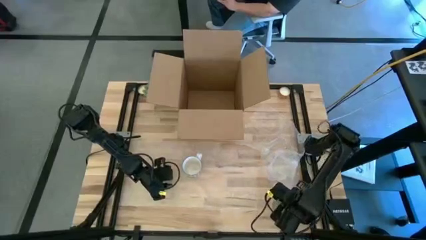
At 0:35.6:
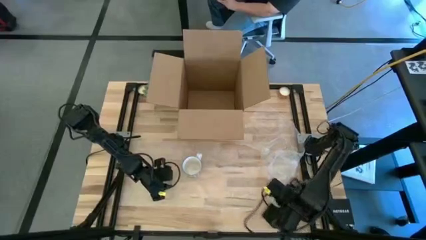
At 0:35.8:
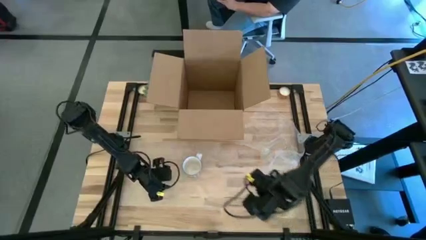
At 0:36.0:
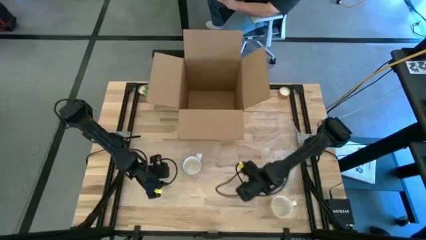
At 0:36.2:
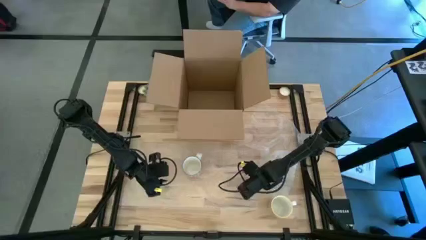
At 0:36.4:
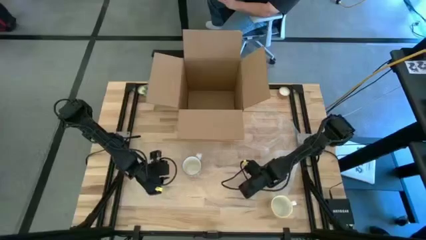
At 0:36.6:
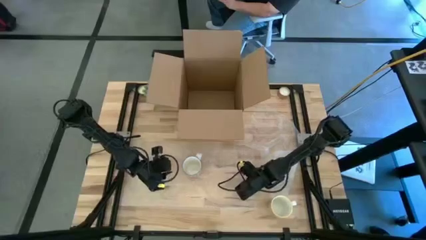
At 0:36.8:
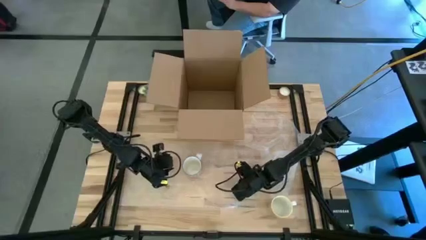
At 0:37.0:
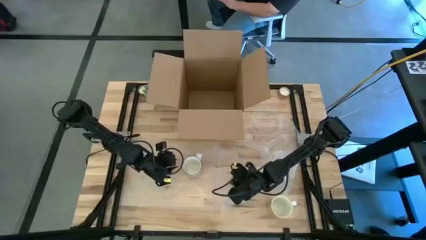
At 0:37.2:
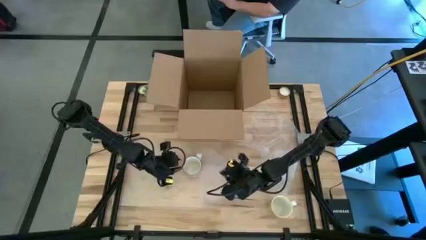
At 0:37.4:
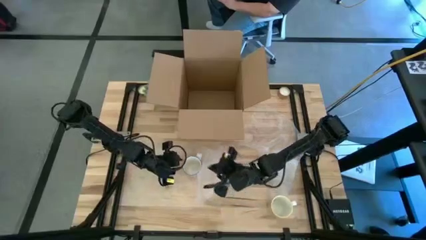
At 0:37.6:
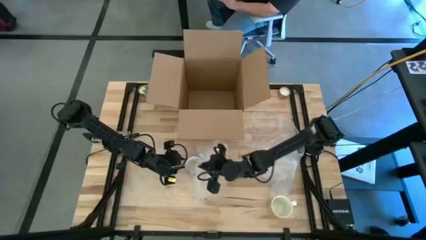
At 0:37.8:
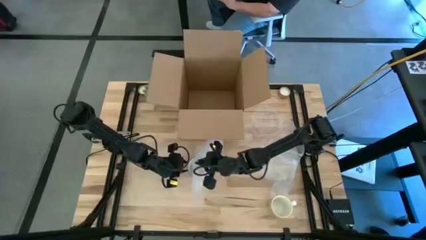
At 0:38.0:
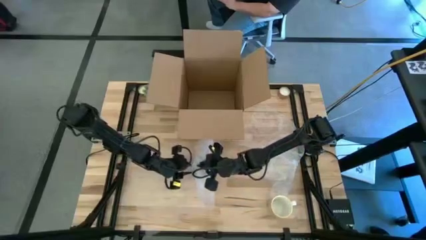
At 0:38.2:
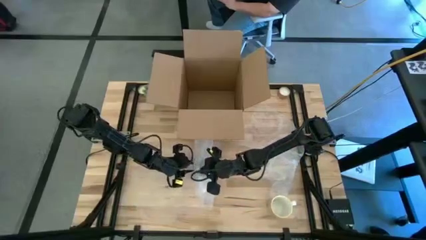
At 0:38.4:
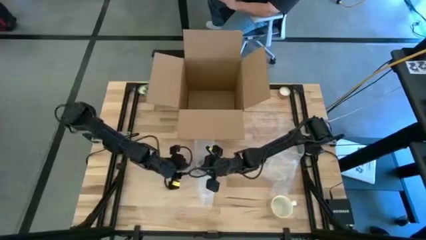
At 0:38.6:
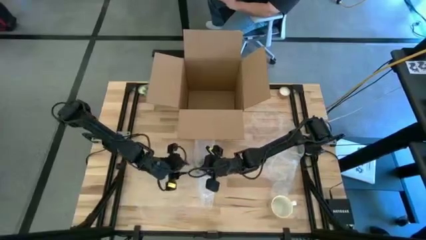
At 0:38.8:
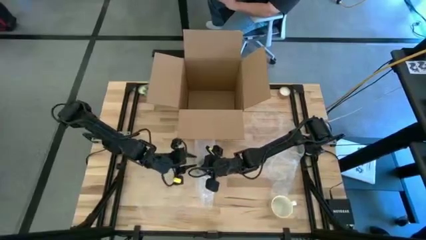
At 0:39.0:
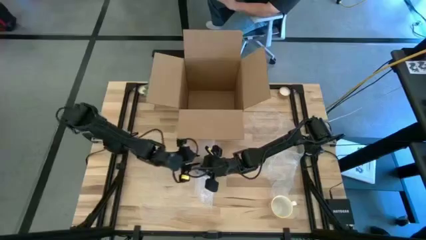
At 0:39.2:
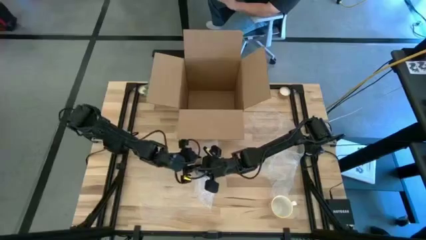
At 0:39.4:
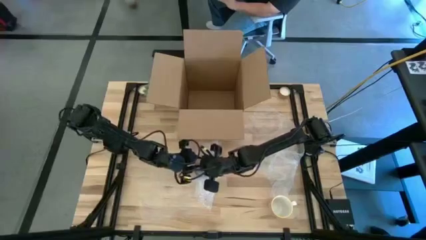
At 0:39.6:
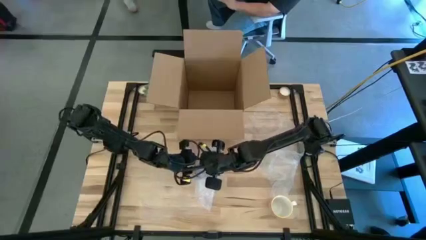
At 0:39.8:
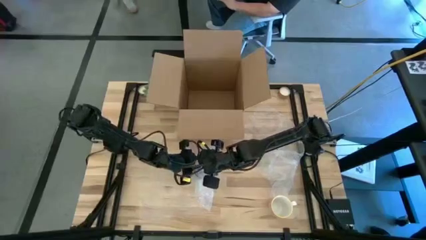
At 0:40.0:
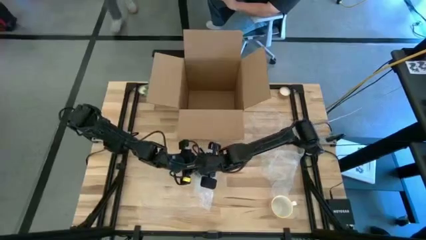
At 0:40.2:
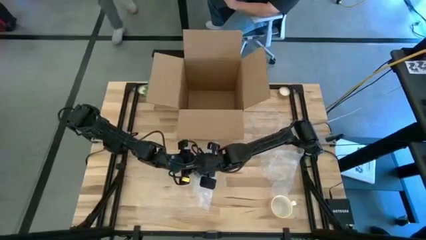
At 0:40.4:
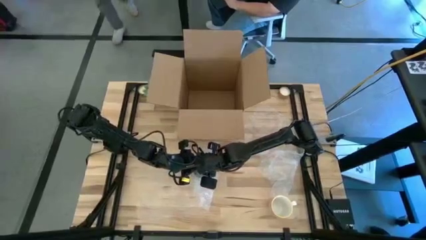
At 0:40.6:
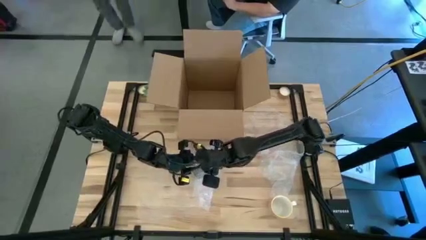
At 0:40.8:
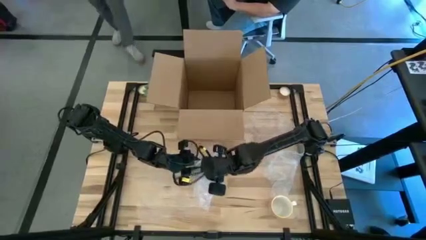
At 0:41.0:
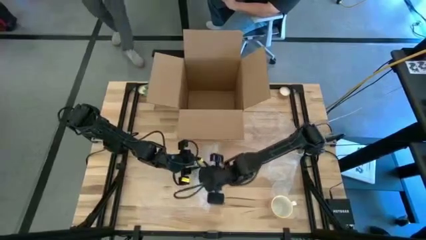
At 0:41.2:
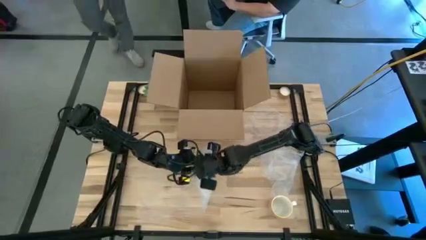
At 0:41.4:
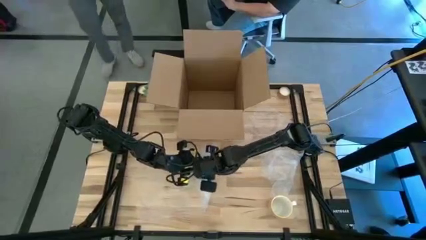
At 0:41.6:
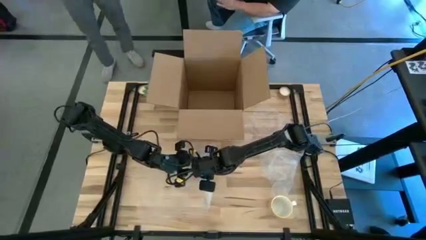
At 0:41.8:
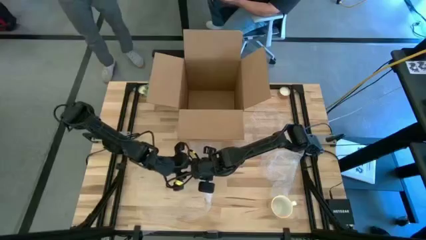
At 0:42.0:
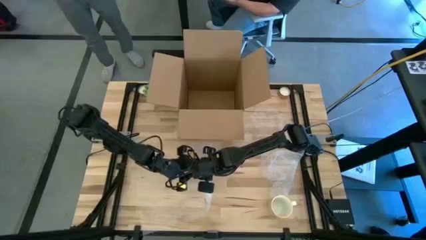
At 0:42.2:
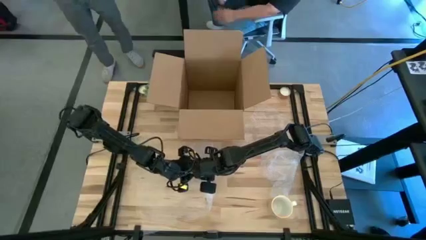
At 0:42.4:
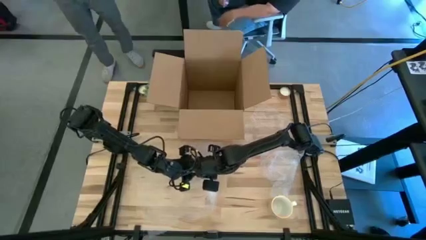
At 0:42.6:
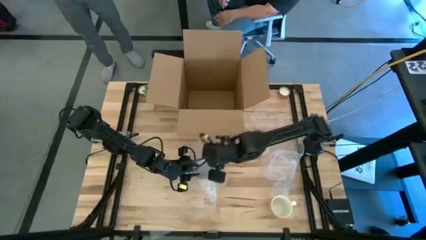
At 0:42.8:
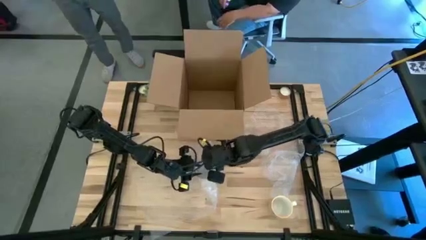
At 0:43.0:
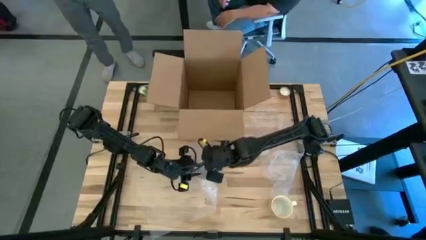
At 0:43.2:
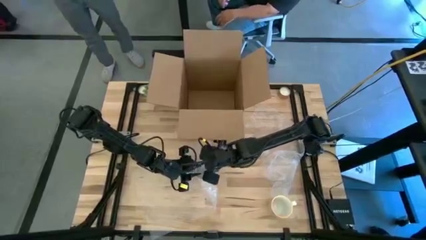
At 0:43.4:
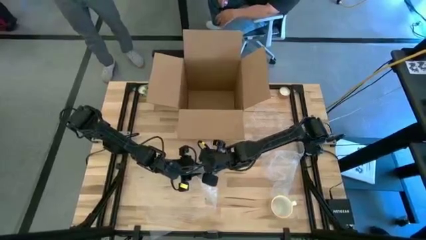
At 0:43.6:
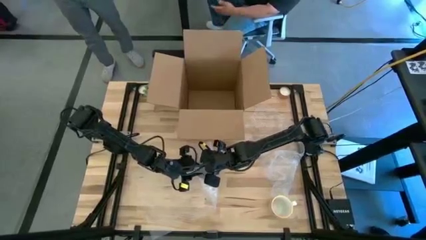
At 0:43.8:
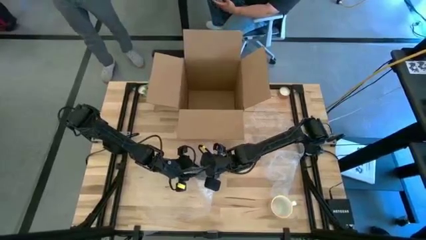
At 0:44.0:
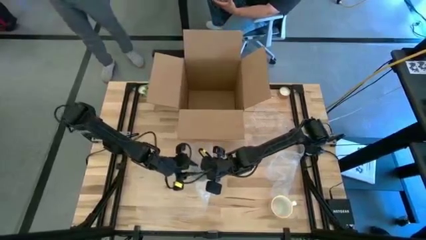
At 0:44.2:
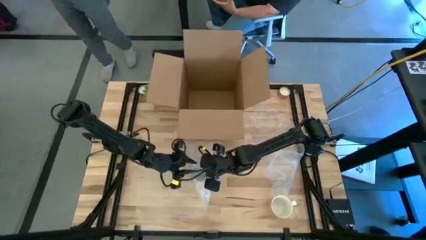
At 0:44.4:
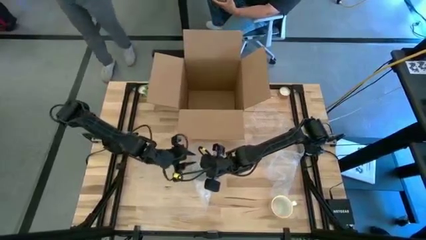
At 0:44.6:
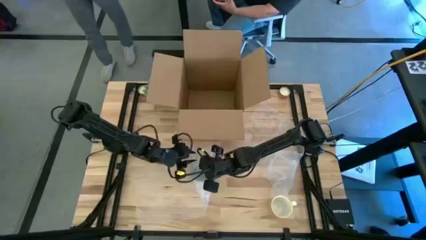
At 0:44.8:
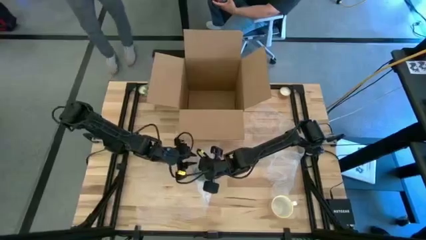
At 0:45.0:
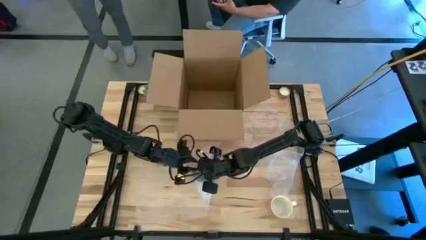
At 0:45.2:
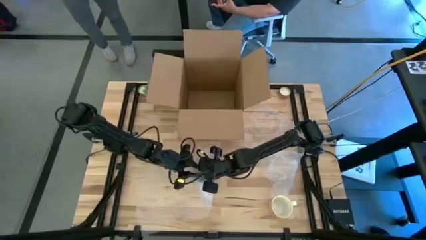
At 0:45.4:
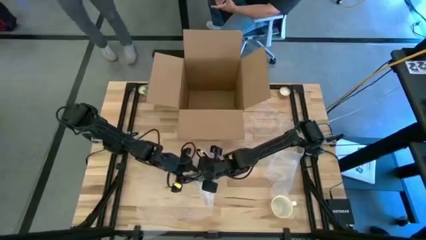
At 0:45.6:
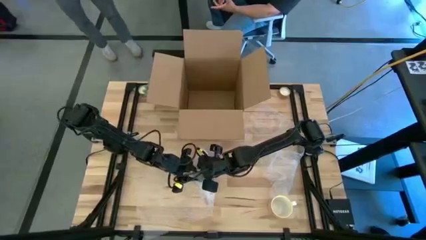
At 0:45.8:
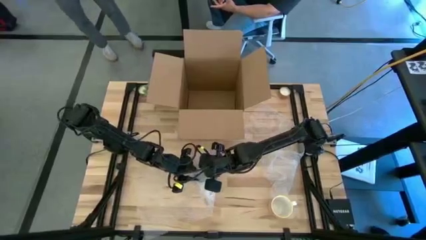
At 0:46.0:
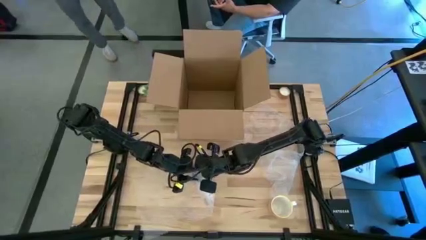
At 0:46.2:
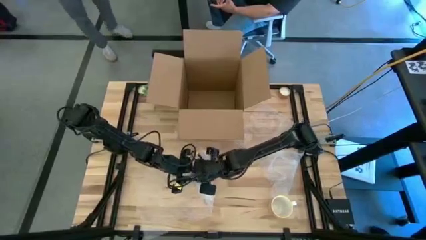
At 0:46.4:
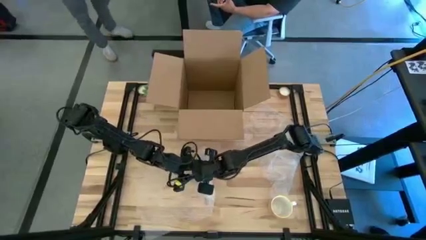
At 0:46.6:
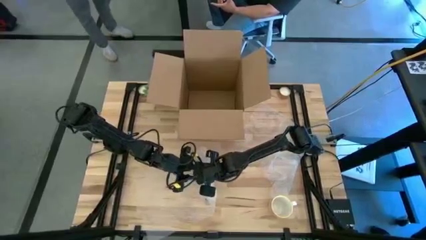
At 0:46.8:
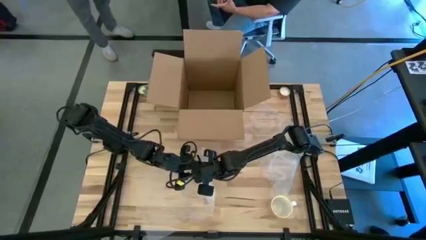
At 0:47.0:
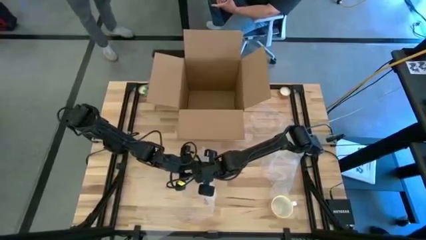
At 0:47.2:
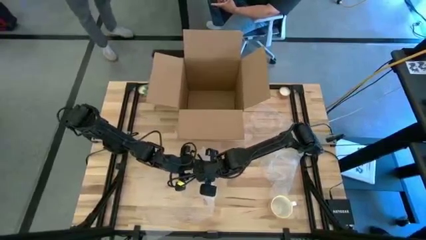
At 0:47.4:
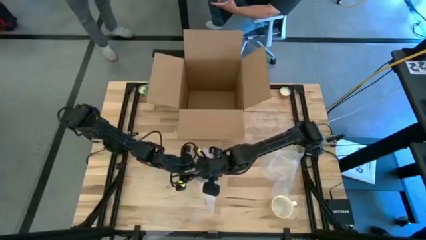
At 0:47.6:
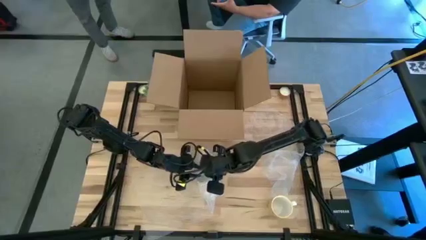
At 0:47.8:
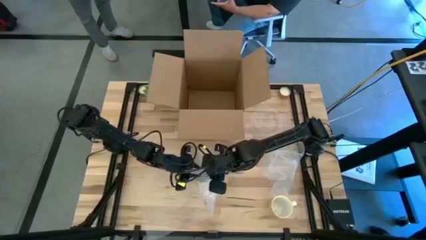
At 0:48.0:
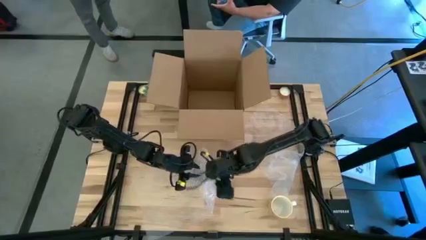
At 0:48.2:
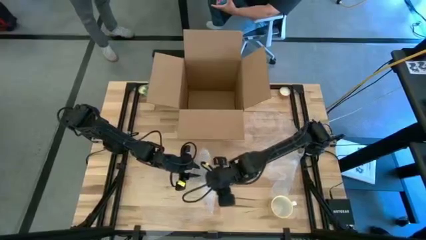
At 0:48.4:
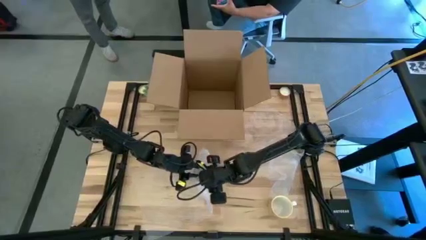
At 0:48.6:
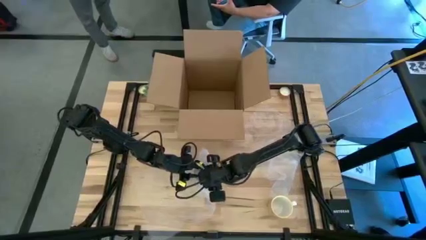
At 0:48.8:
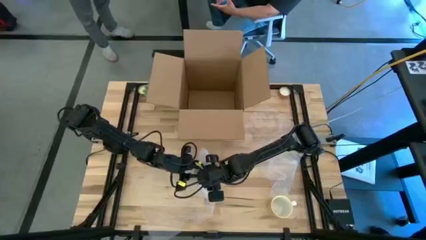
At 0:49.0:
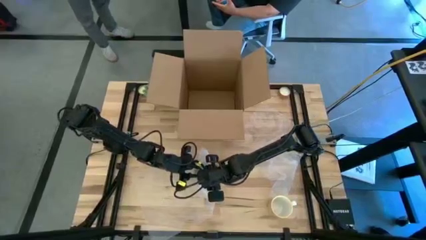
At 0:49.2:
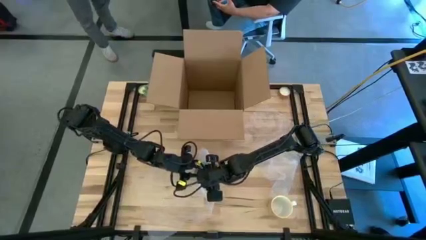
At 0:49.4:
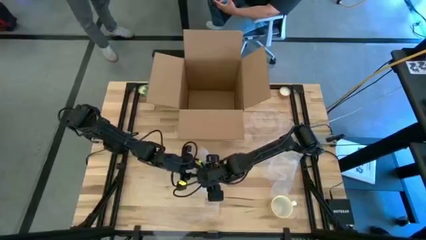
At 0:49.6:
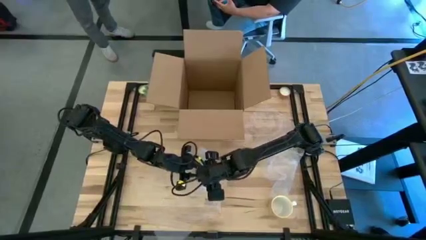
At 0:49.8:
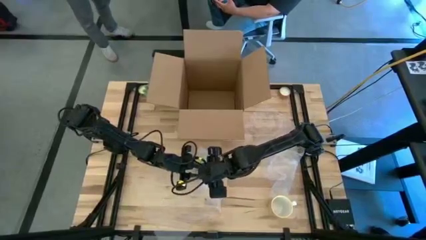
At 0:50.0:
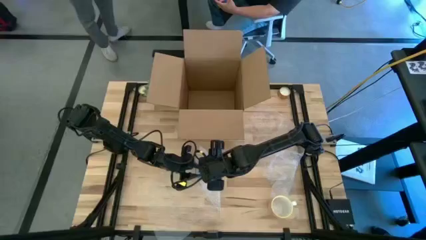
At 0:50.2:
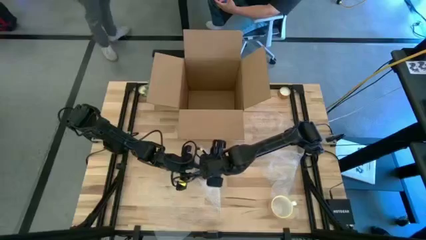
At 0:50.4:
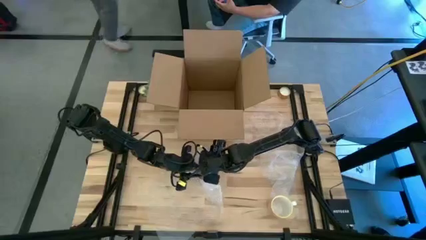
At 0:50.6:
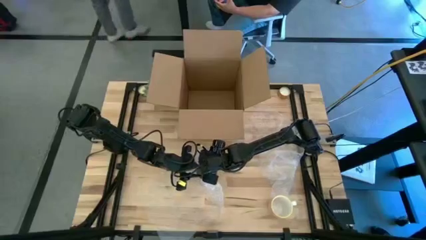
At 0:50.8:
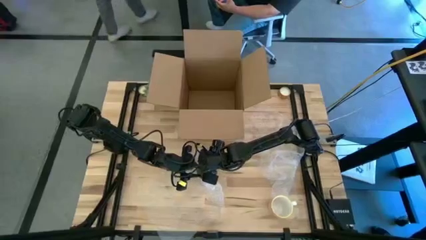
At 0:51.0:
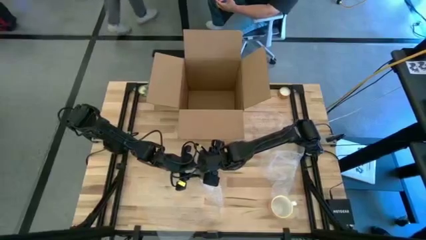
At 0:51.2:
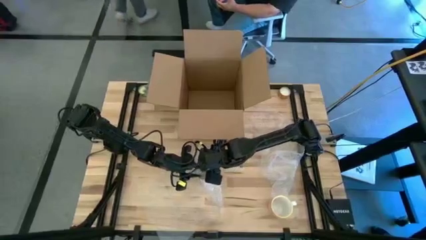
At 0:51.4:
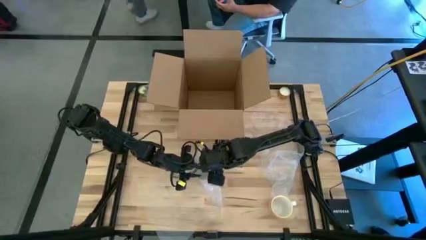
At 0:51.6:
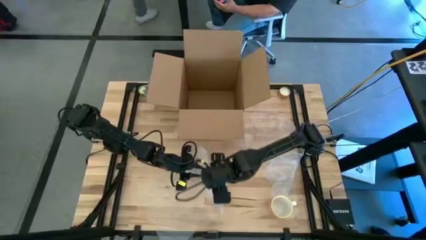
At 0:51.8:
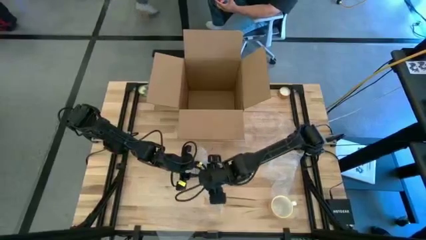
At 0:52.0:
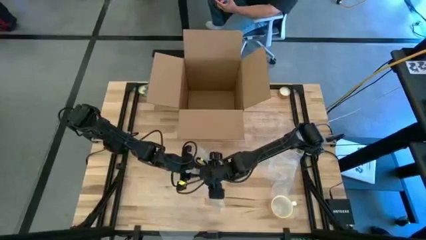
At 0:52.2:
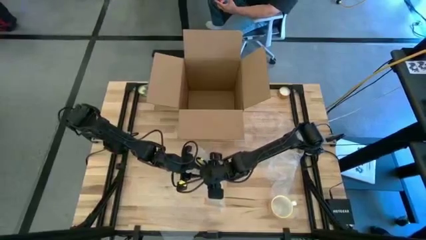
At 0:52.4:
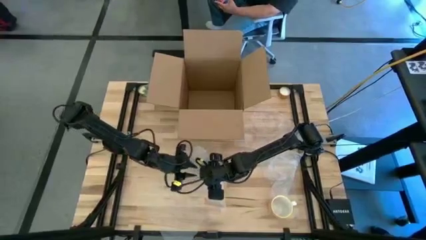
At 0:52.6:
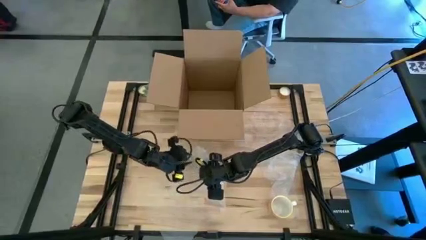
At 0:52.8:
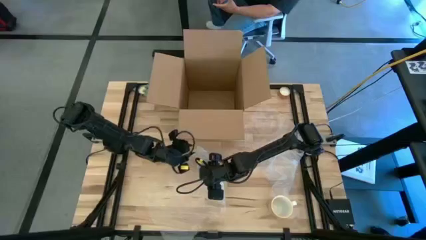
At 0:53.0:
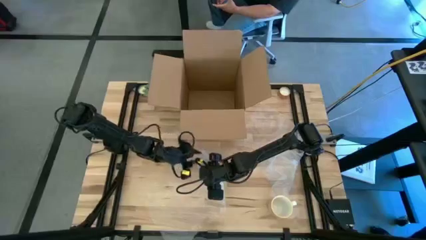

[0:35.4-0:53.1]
Task: wrap mug
Wrap the red mug with the bubble wrap
